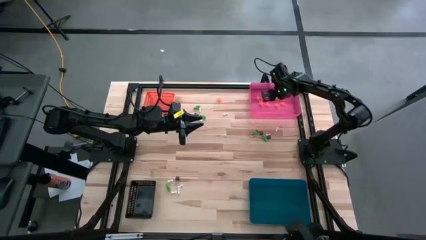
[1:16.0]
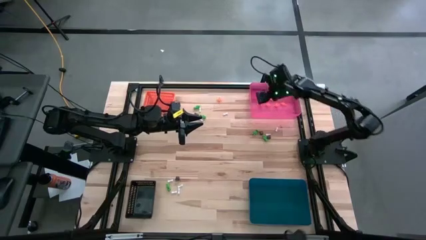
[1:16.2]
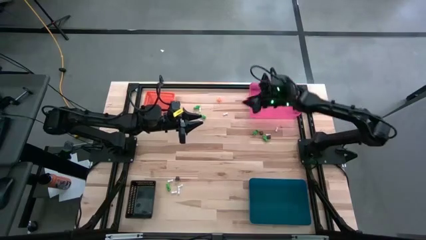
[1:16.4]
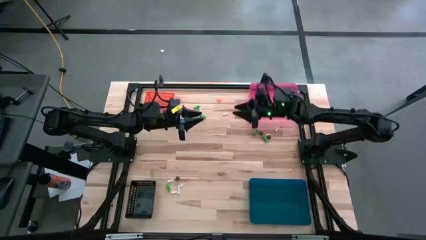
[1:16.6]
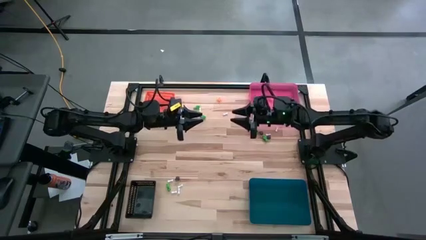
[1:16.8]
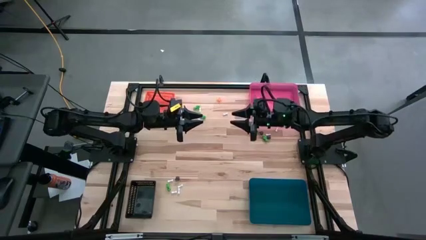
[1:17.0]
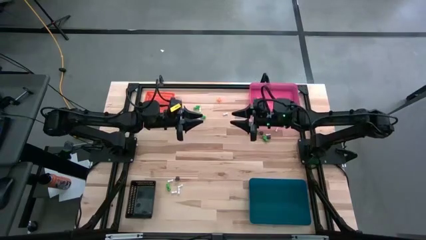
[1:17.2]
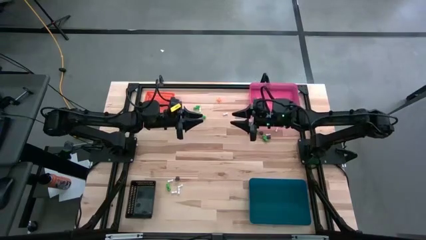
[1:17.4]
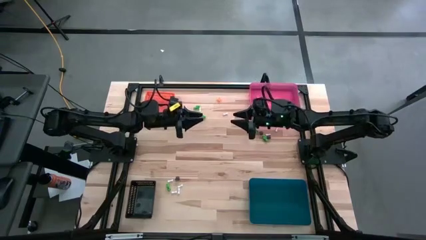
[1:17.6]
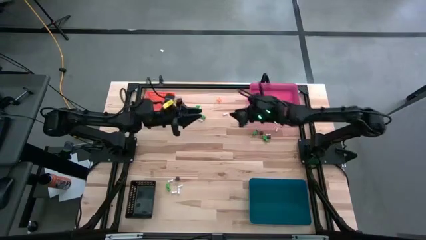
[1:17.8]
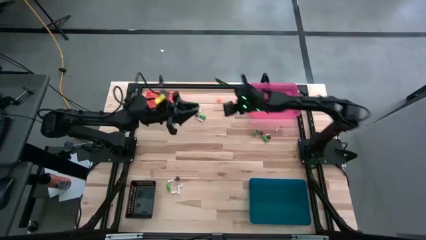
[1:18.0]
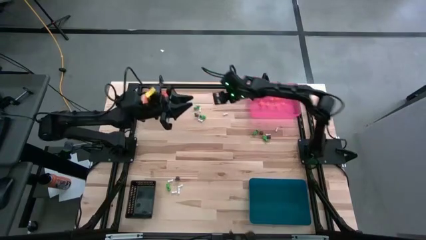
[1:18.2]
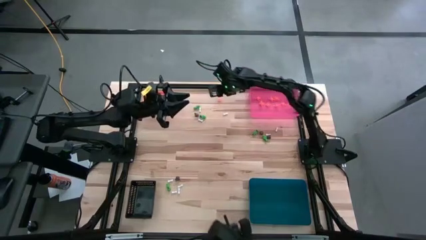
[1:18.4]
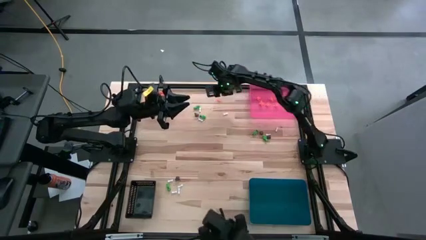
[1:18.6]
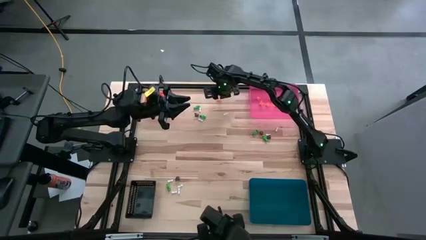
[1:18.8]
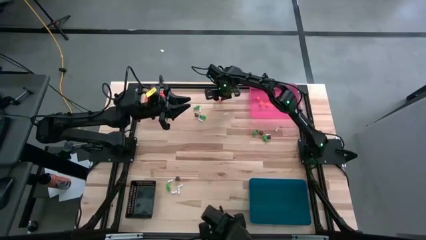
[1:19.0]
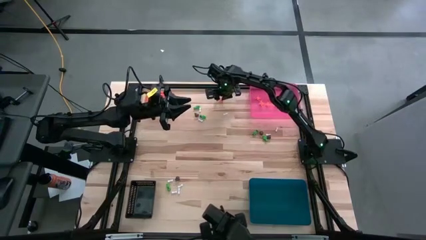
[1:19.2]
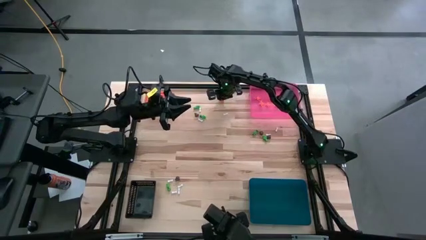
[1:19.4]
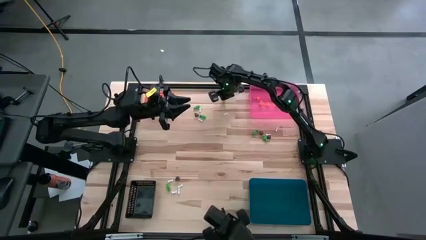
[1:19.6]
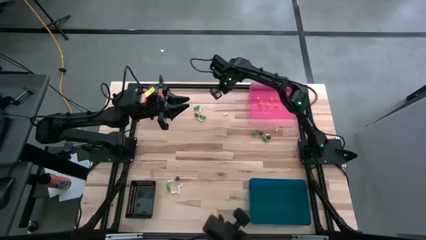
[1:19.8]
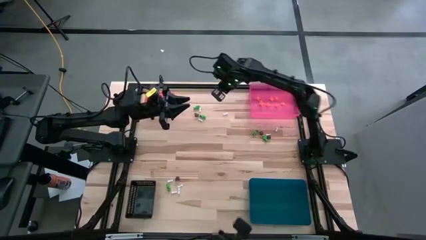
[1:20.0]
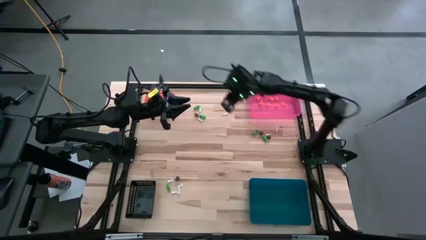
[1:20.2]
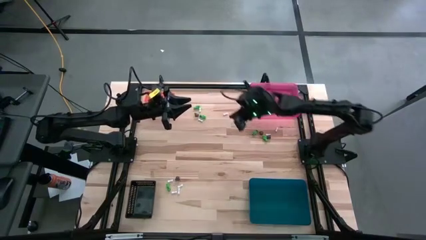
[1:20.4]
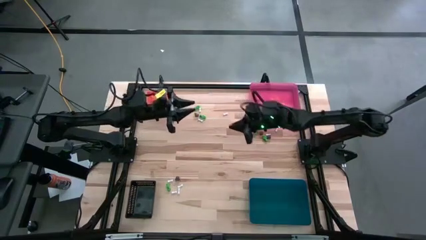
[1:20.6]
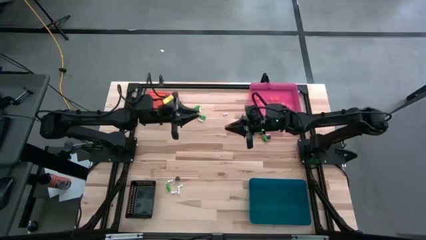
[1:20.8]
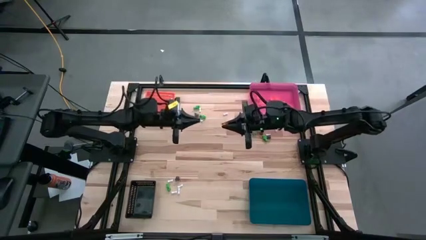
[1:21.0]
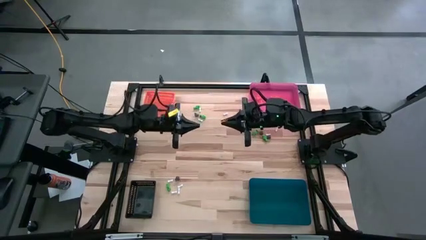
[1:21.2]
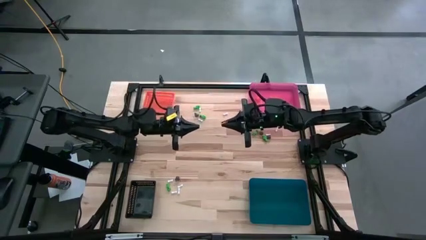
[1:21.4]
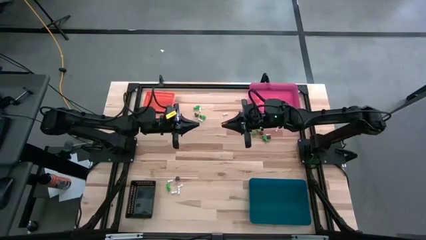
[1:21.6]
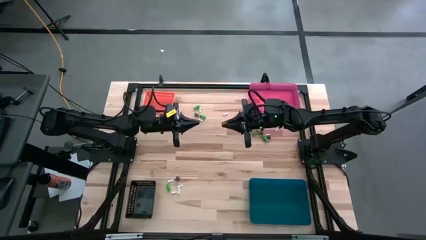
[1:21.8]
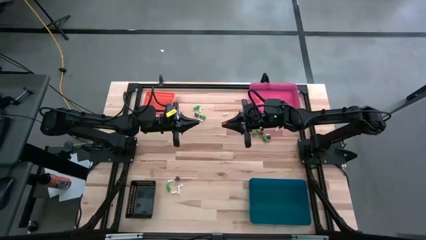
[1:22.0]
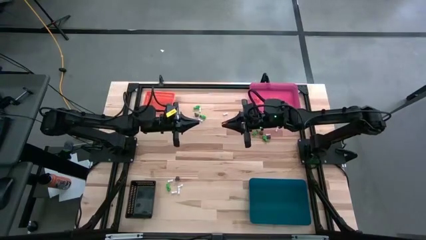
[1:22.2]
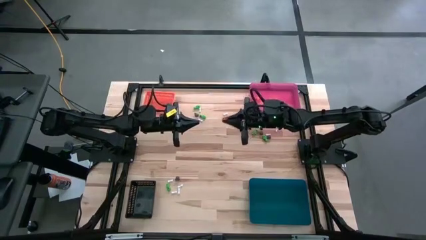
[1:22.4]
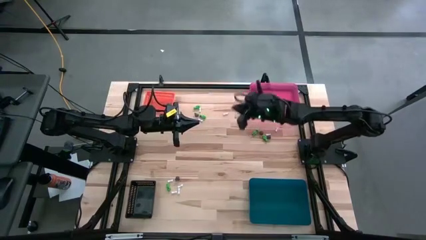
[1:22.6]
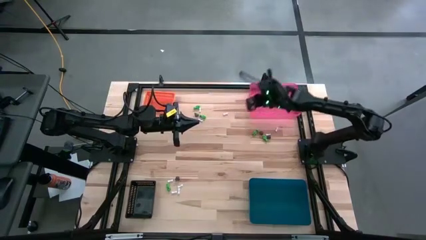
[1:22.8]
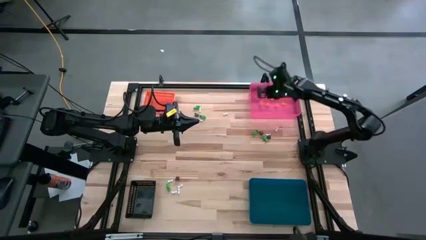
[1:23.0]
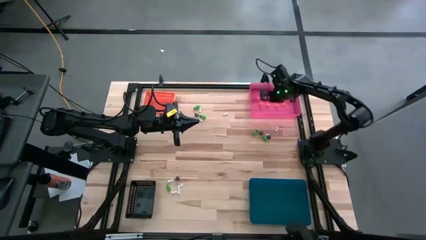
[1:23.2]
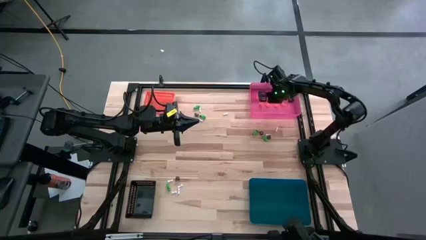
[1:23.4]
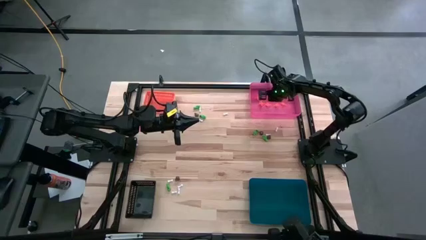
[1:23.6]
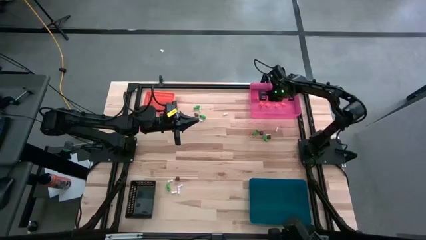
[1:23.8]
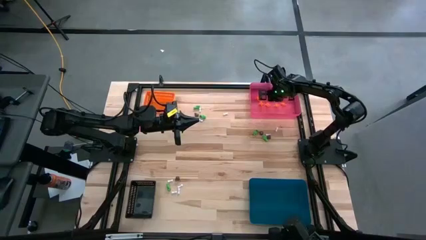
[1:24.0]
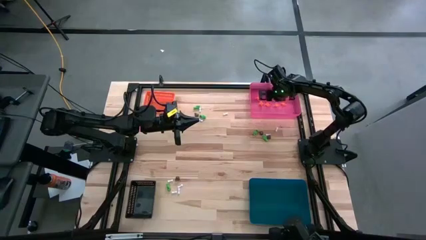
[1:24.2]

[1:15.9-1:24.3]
Task: Sort Halloween decoration
Put the orange spider toy into the pink bin

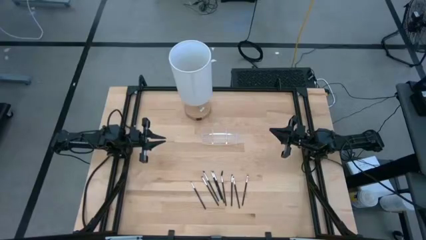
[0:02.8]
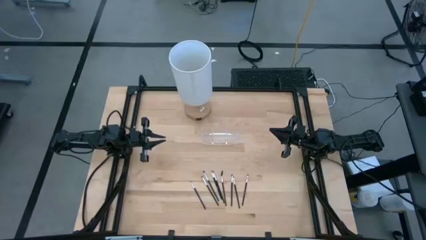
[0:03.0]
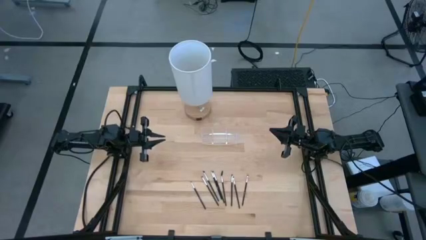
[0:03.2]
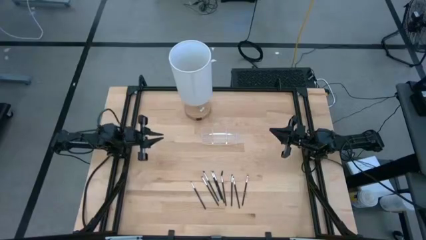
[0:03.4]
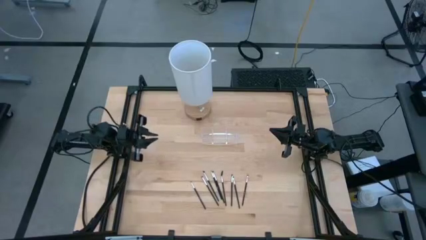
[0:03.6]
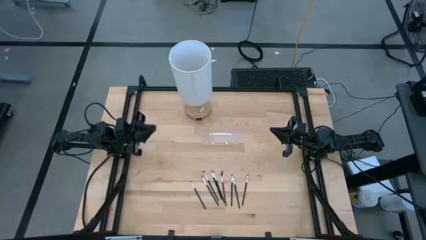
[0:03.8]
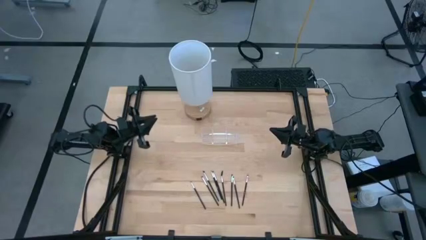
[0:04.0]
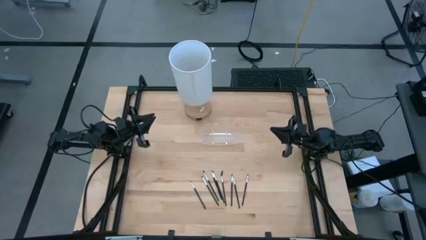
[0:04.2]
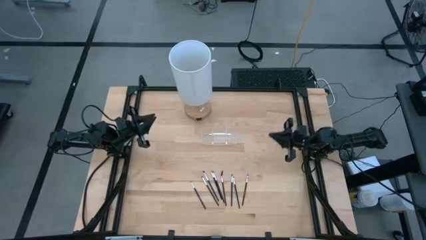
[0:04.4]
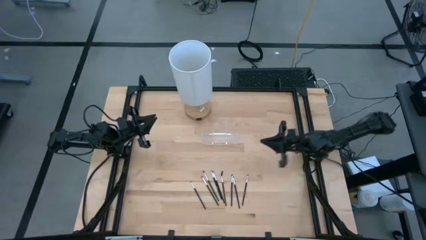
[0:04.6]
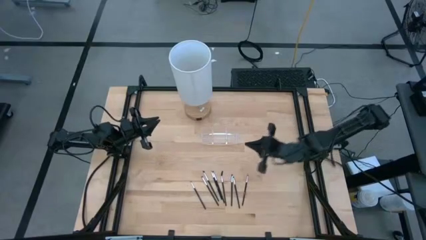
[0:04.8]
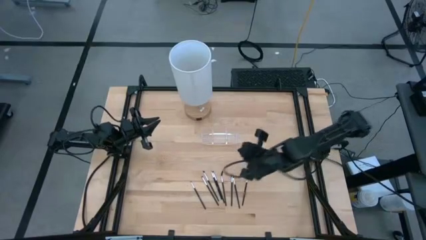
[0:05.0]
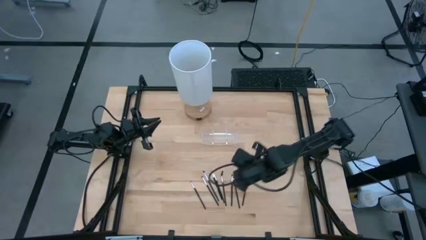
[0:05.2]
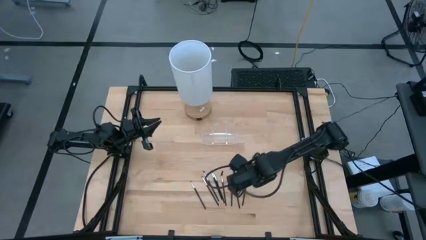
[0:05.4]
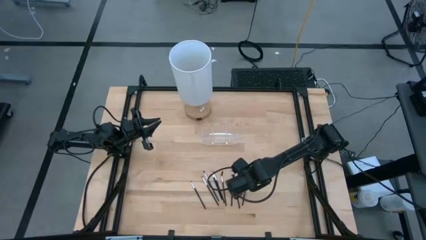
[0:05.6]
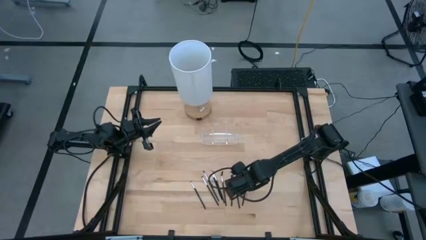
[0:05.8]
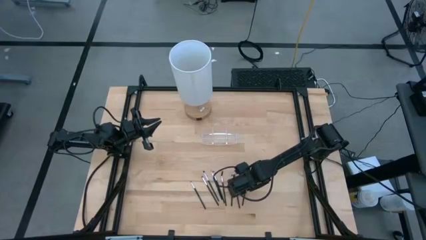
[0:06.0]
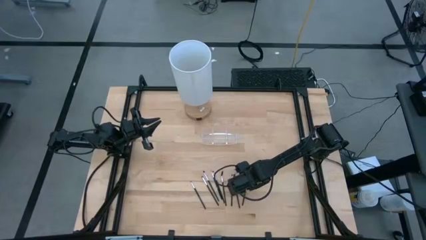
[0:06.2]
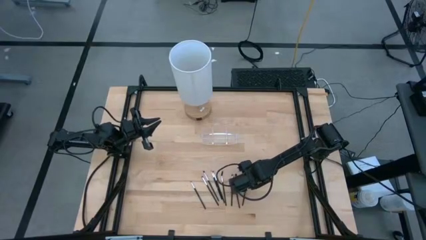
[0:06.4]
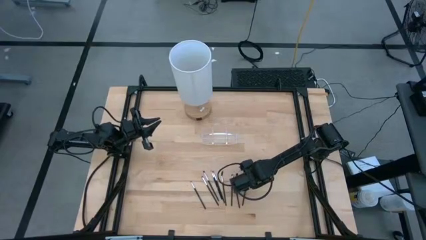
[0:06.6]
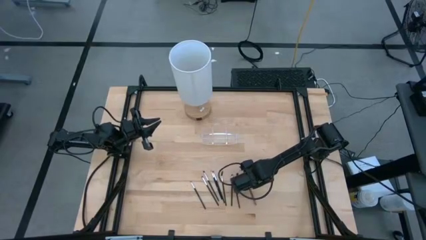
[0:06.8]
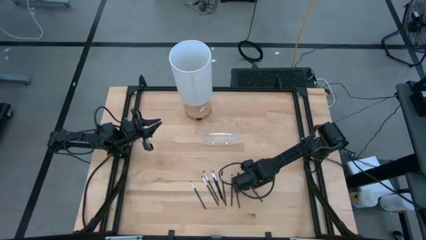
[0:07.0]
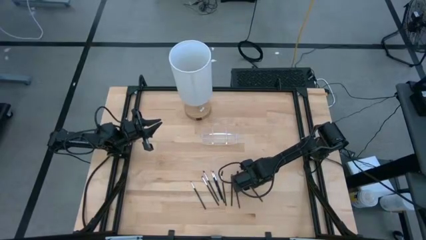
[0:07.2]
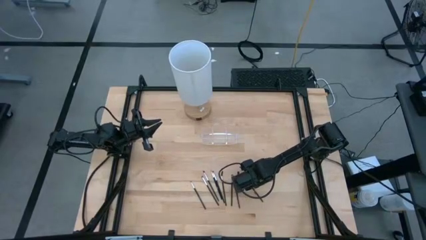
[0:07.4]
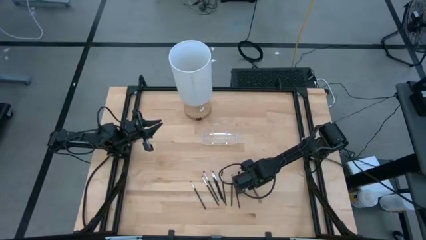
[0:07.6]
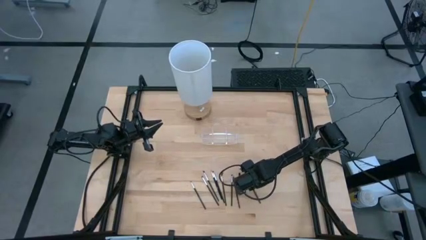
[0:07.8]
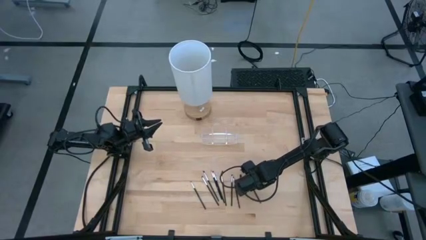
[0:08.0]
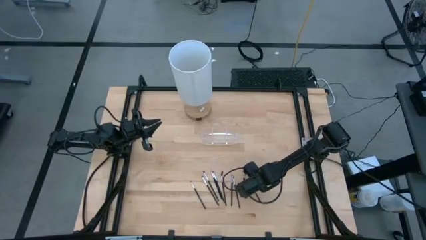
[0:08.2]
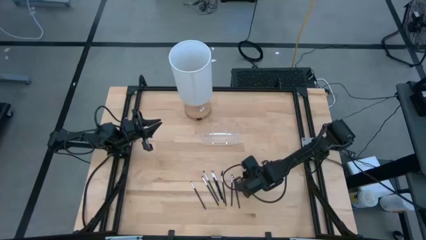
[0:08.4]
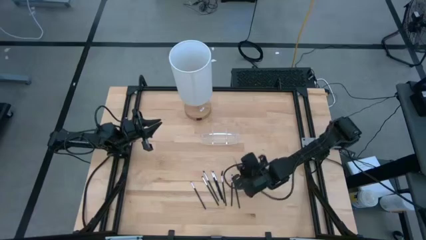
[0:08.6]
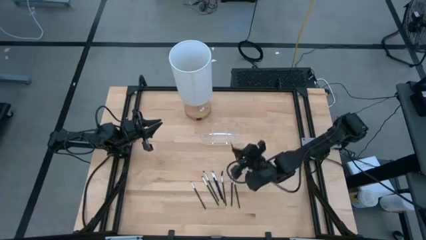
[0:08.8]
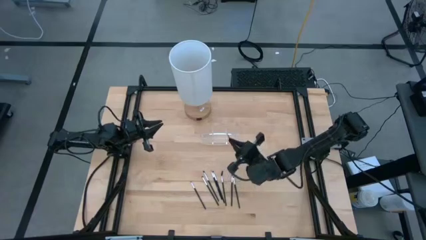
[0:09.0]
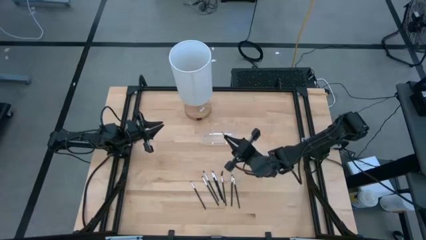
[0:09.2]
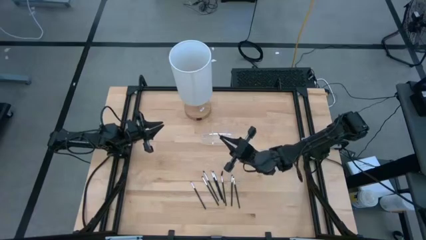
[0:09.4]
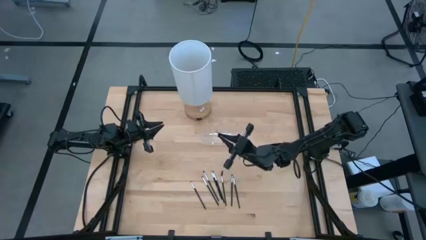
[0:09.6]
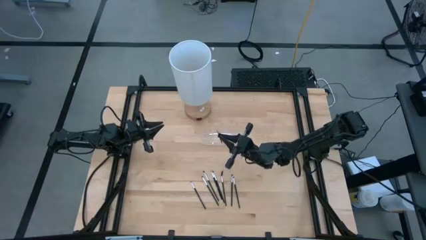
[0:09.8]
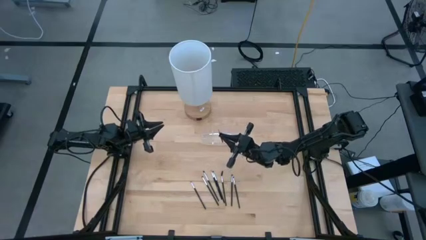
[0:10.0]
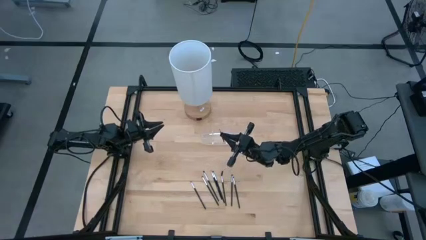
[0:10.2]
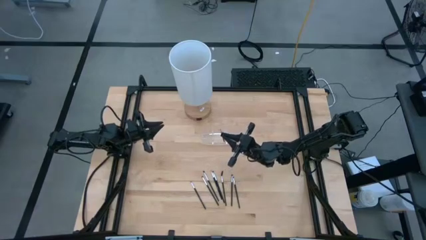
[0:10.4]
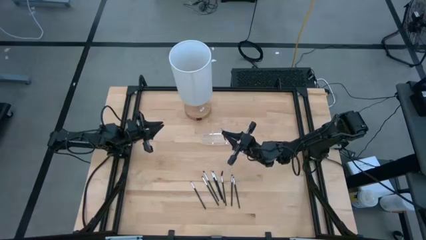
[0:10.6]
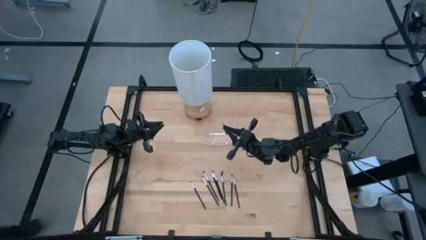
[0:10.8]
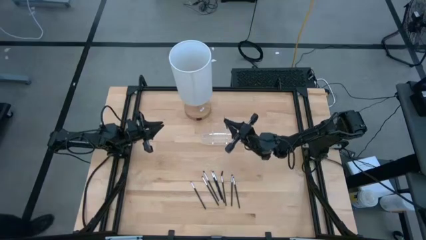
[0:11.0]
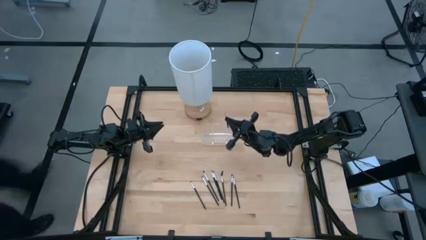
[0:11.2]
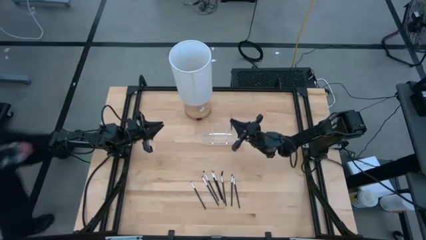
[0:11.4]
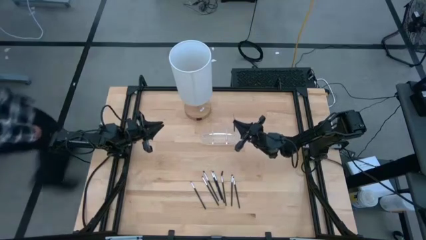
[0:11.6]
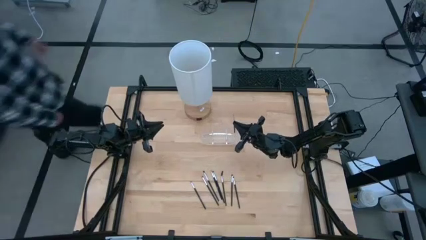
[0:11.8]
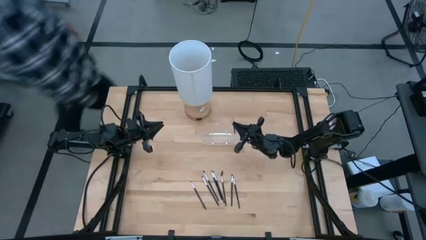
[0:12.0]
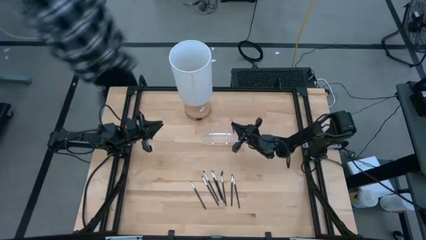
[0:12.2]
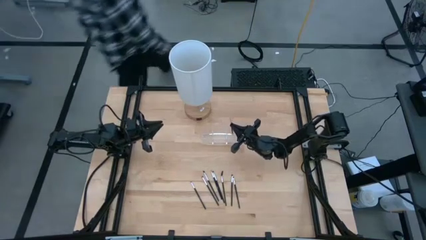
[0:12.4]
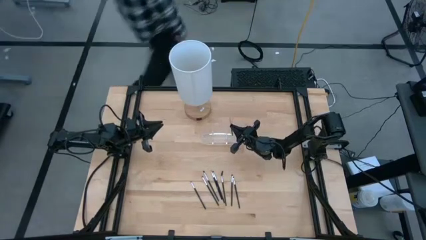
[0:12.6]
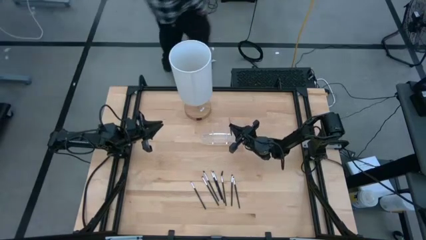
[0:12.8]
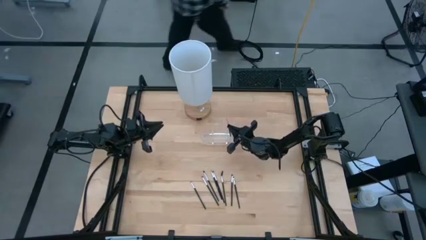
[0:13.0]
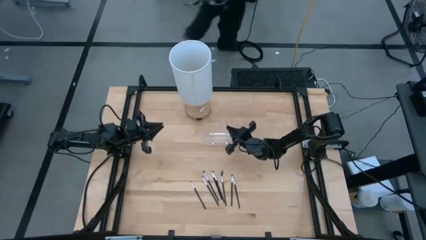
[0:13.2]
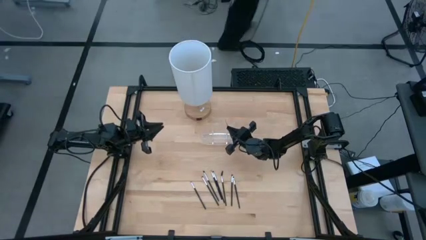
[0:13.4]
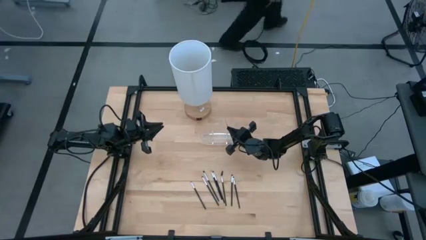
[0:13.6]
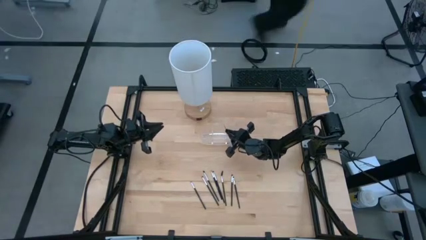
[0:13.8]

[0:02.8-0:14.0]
Task: Pick & Place Makeup Supplies
Put the makeup brush into the transparent organizer
